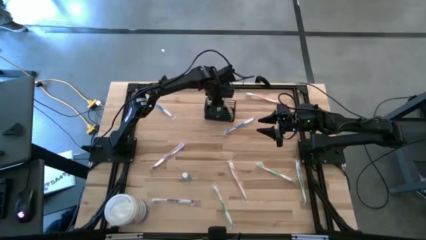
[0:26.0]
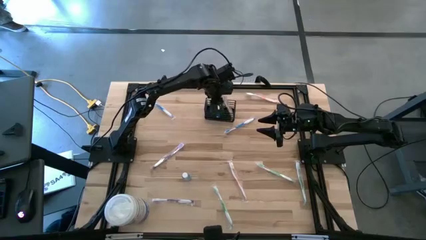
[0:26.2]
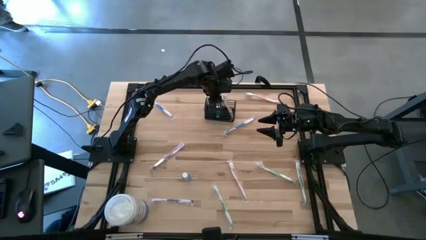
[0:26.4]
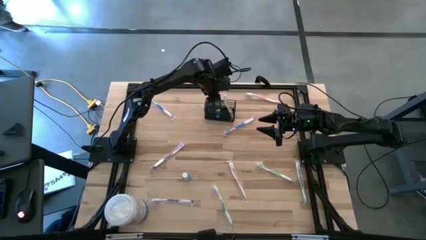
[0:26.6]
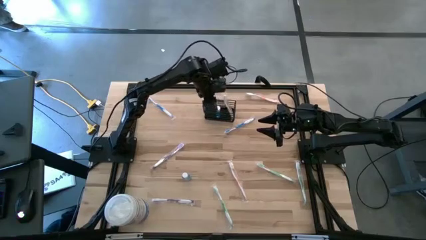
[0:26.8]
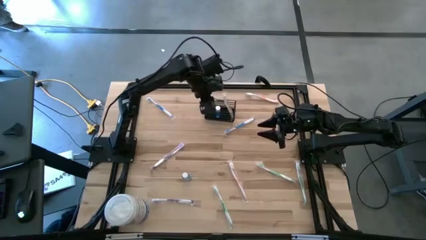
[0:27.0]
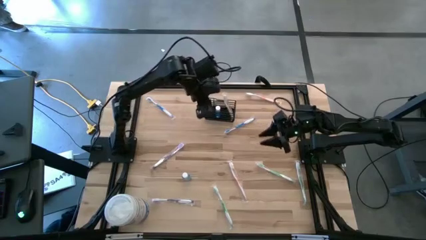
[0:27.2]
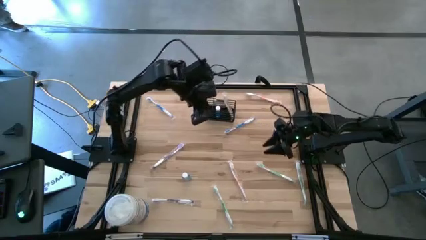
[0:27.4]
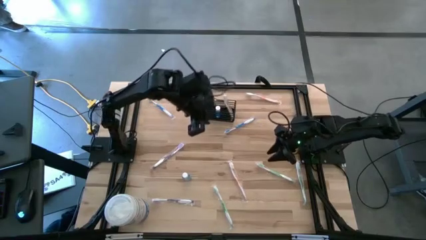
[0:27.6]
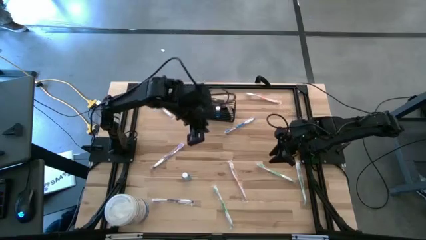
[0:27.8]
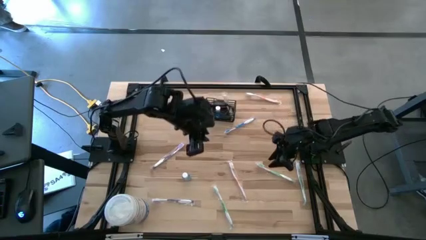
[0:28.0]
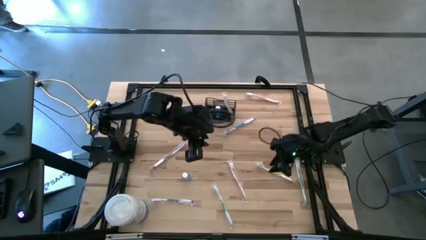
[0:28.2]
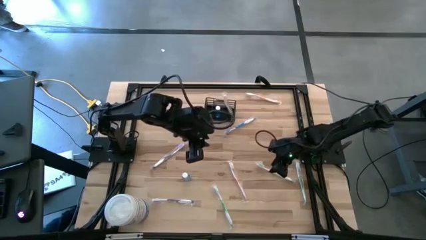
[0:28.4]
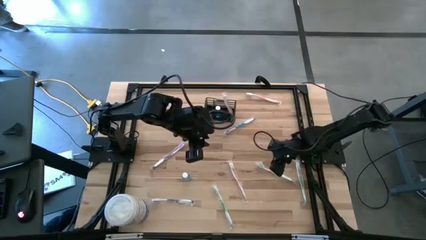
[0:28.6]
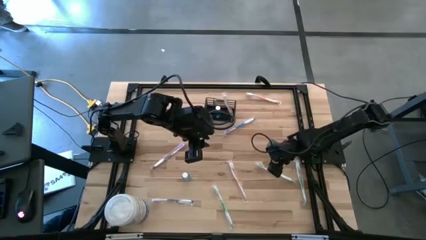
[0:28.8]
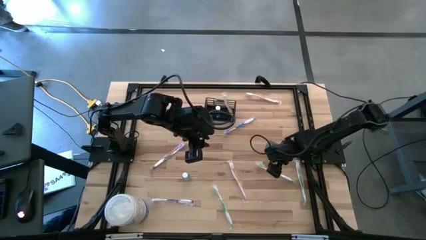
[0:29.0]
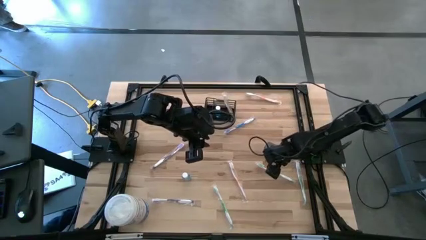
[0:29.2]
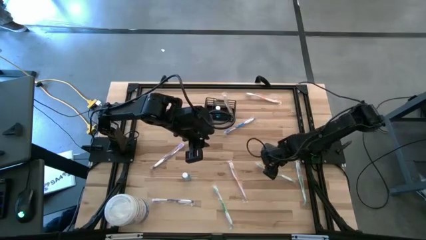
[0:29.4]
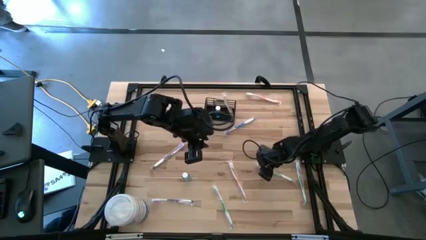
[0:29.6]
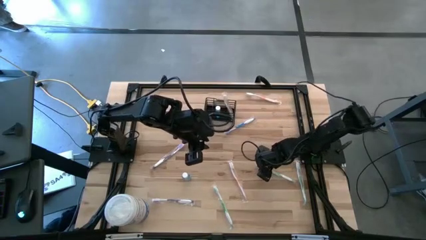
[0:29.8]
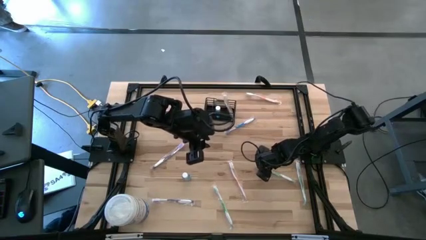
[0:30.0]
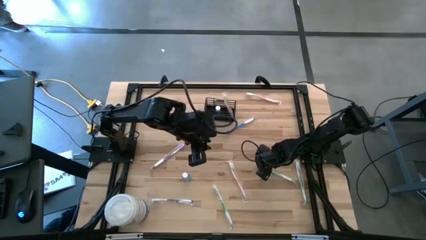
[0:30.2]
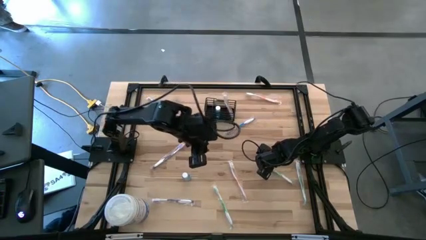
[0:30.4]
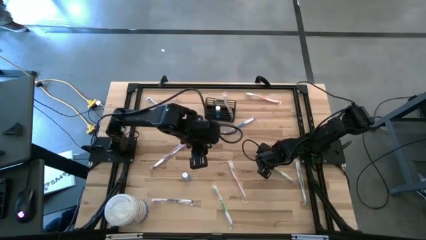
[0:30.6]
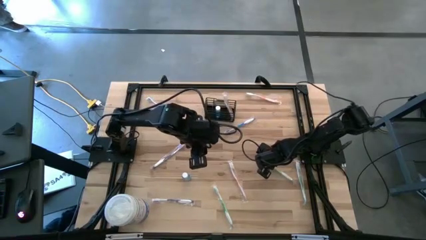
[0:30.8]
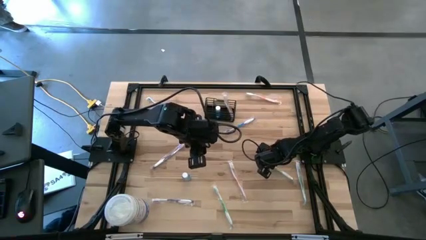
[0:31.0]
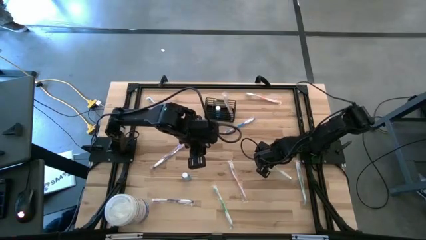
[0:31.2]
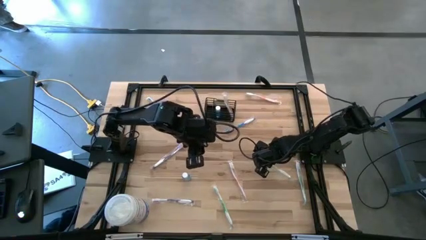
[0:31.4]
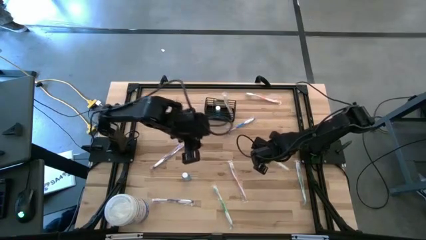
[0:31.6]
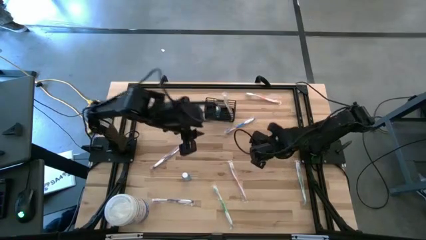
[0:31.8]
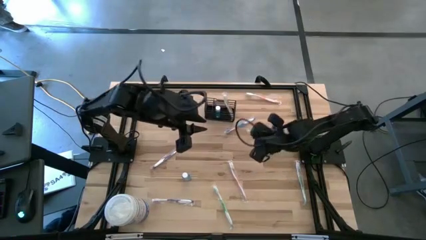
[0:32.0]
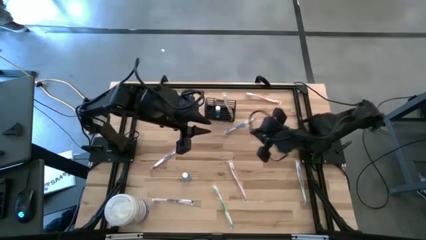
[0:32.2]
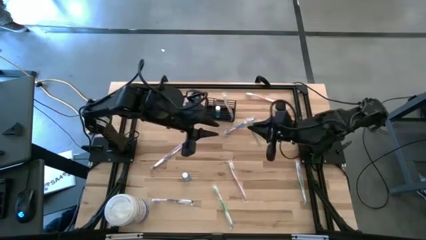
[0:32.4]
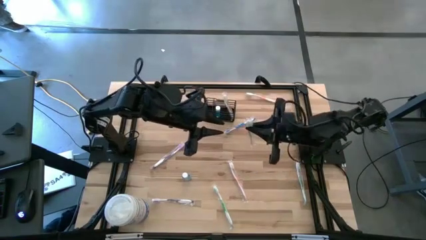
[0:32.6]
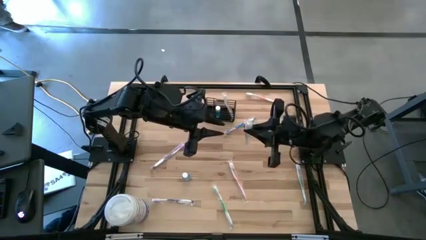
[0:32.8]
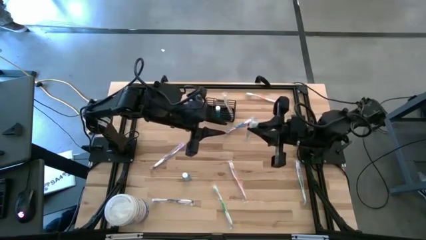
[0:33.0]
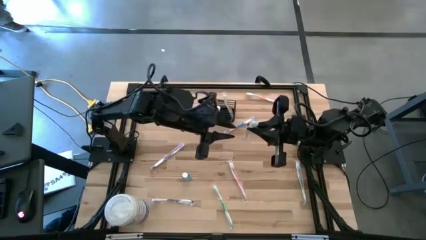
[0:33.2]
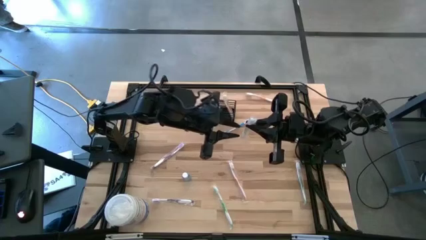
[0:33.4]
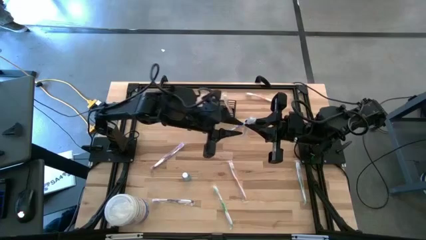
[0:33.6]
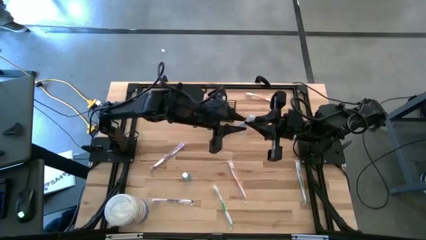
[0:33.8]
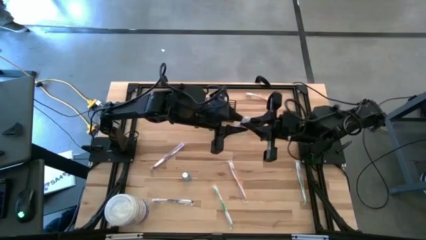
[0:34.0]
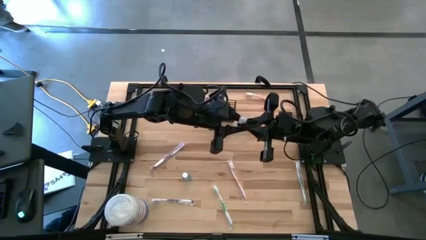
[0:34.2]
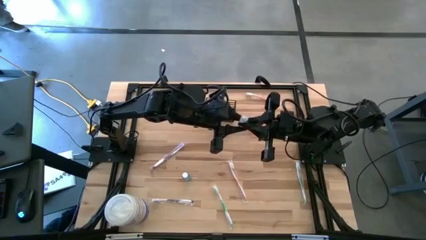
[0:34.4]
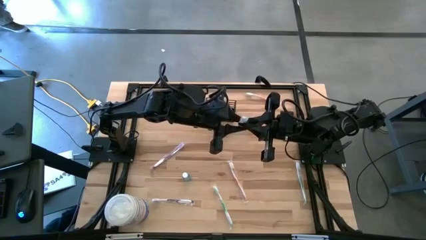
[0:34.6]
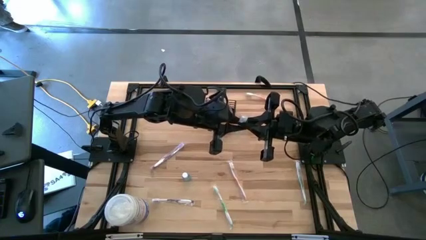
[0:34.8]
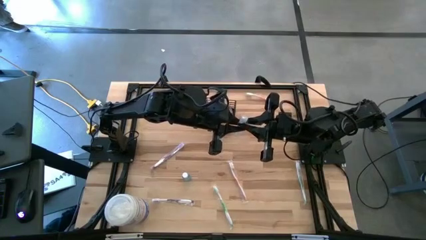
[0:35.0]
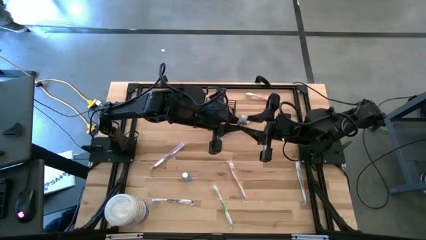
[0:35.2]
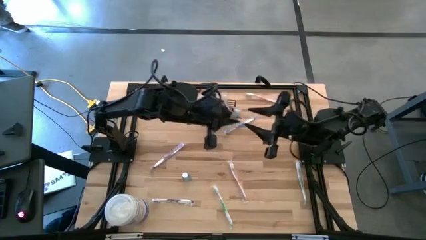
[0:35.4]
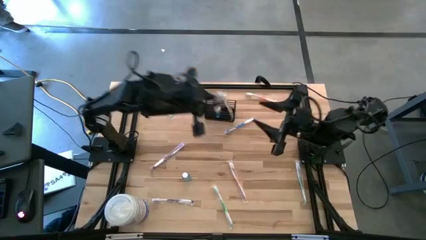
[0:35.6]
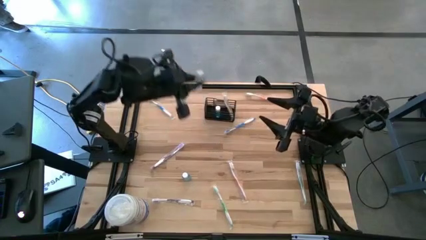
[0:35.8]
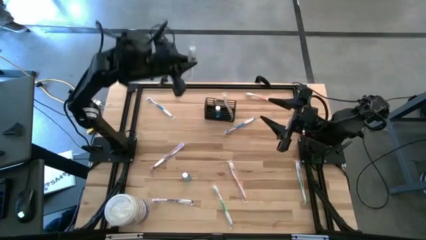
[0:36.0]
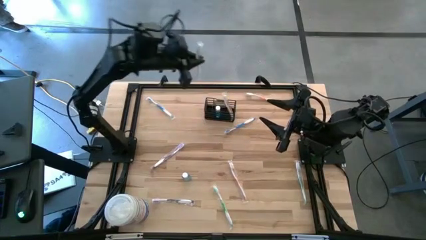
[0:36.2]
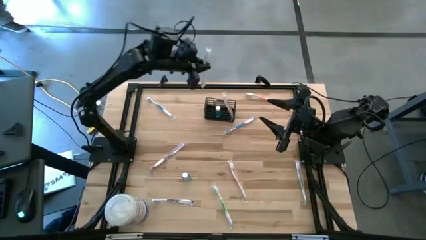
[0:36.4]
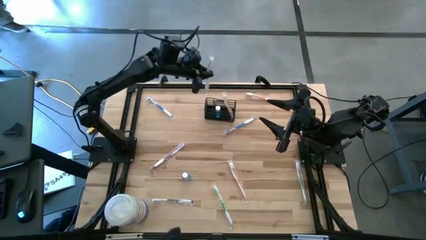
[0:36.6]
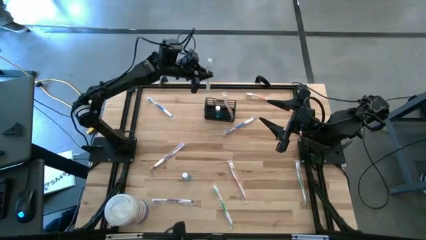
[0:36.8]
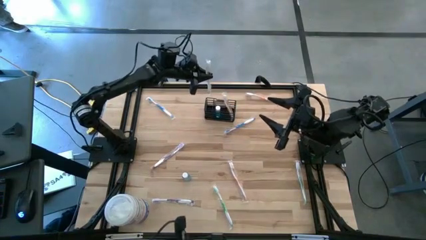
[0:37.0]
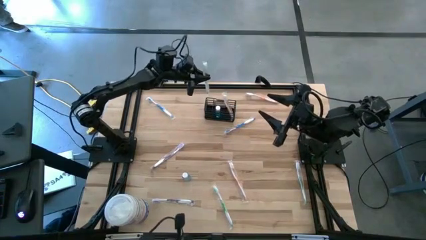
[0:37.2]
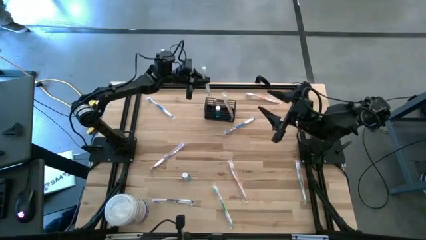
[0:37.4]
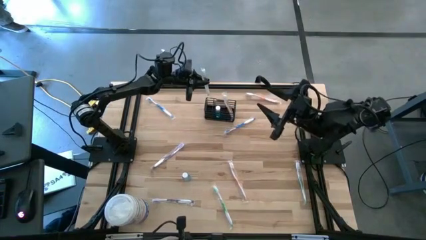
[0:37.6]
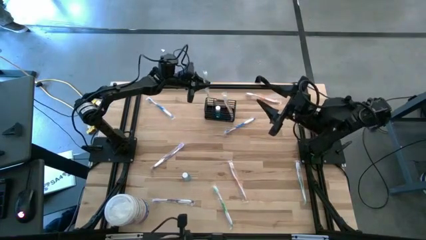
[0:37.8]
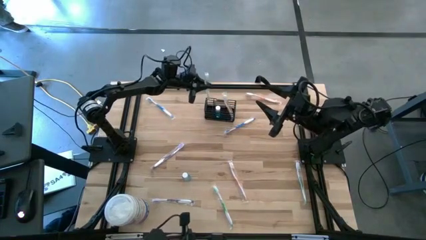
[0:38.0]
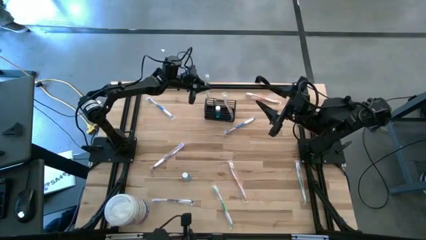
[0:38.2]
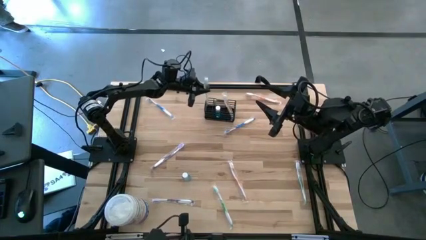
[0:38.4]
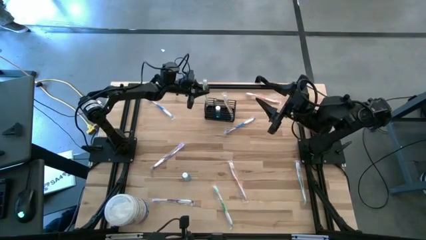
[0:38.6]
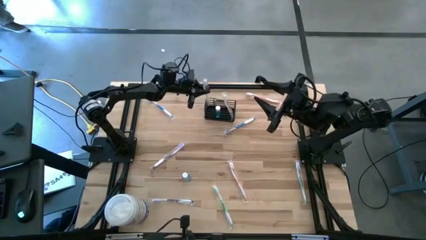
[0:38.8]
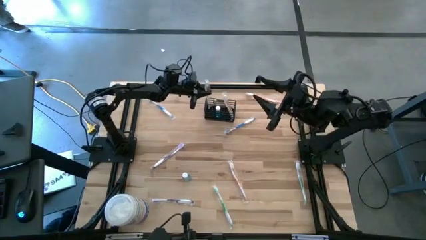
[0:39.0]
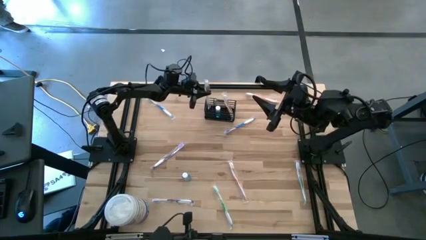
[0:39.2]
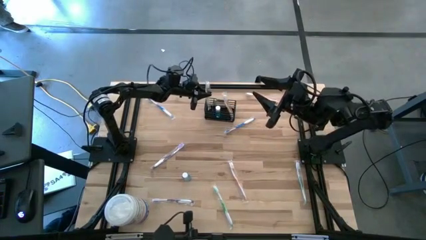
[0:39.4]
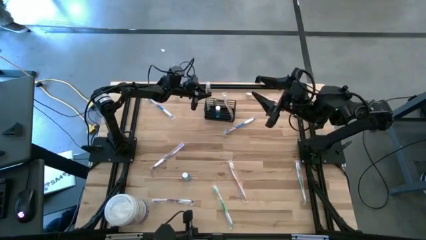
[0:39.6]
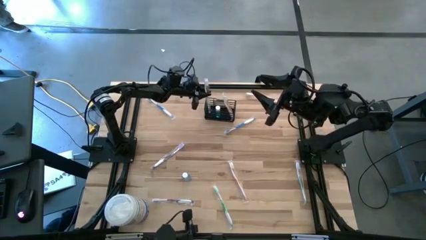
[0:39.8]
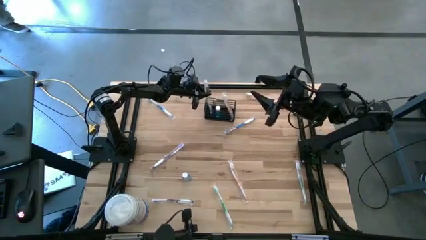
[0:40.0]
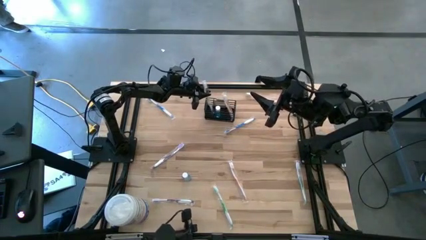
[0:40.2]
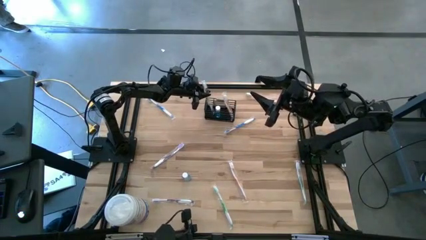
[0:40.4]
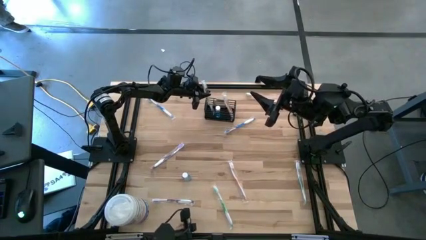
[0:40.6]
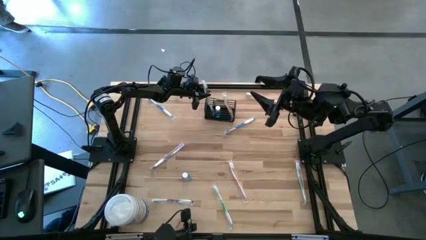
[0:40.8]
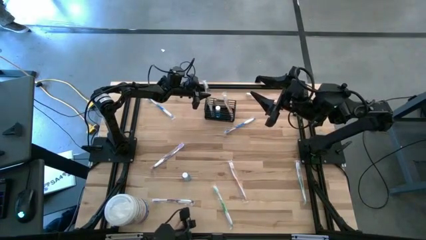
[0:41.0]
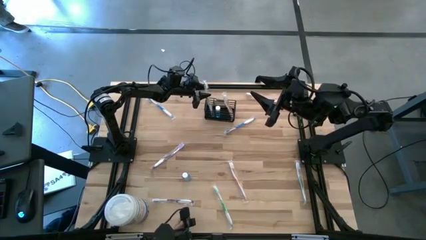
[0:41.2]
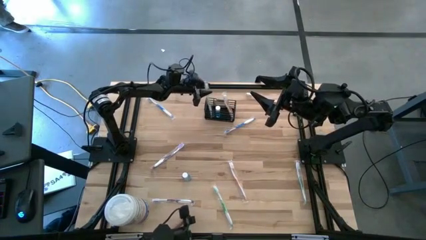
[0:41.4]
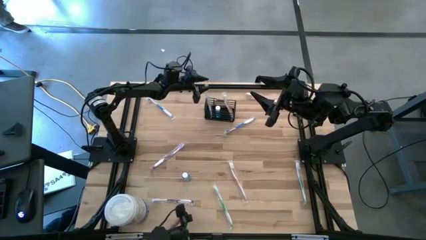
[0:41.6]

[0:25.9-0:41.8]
Task: Pick & Place toothbrushing station
Put the middle green toothbrush into the mesh organizer
